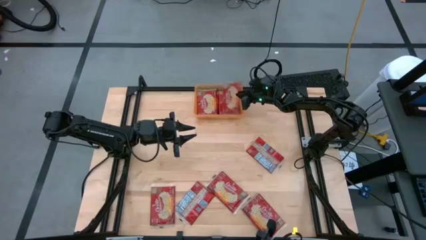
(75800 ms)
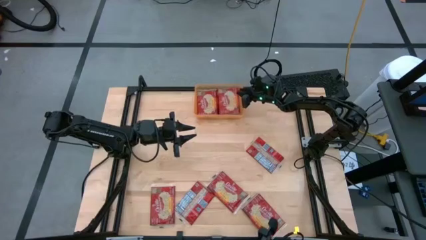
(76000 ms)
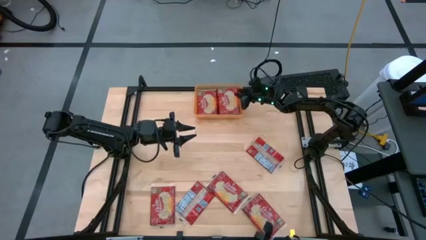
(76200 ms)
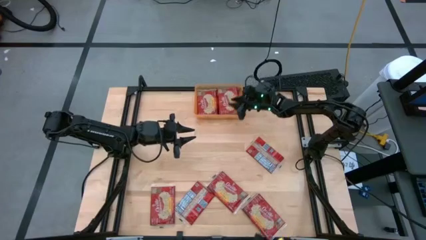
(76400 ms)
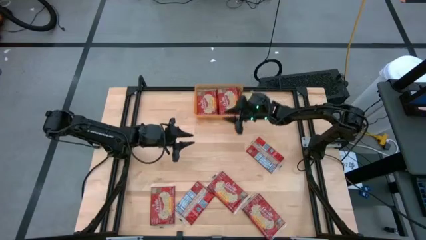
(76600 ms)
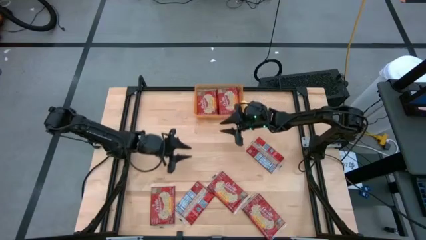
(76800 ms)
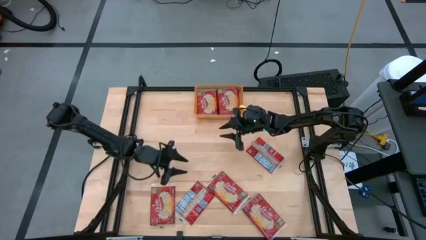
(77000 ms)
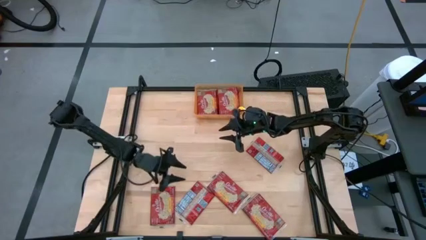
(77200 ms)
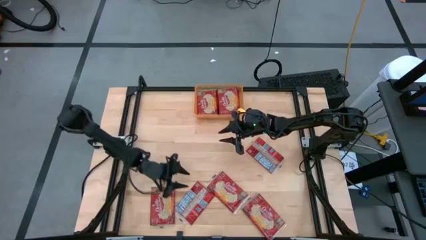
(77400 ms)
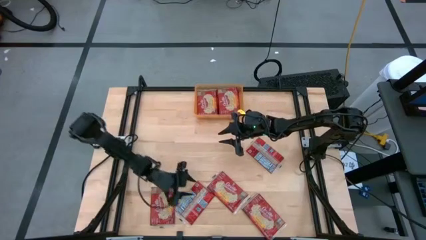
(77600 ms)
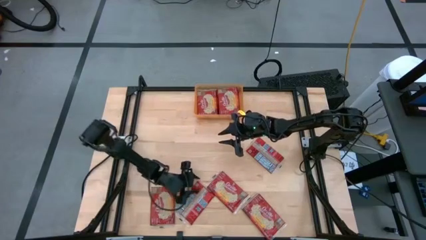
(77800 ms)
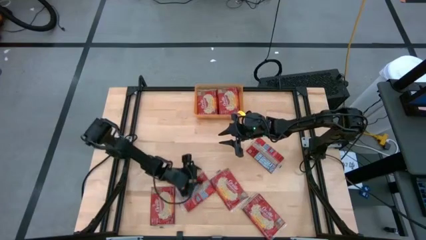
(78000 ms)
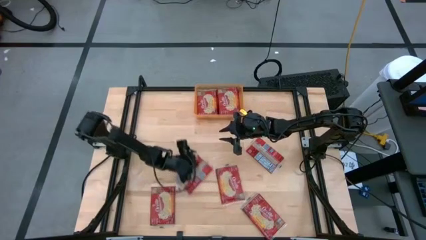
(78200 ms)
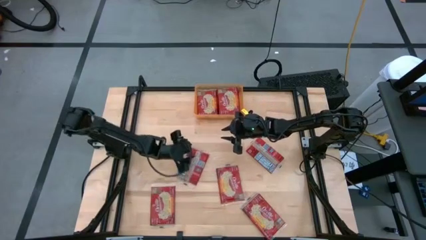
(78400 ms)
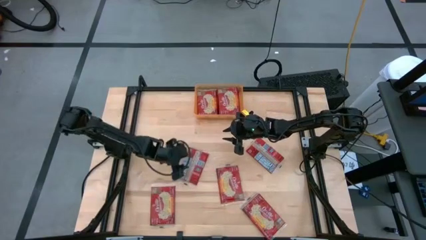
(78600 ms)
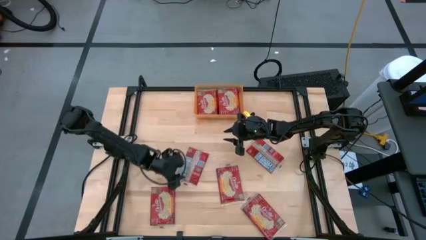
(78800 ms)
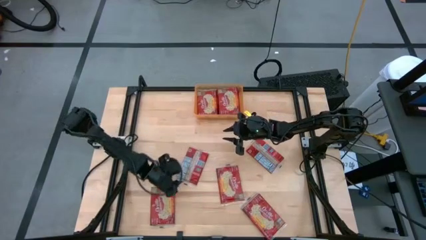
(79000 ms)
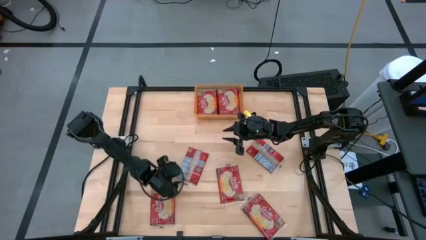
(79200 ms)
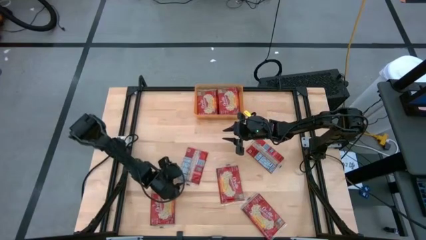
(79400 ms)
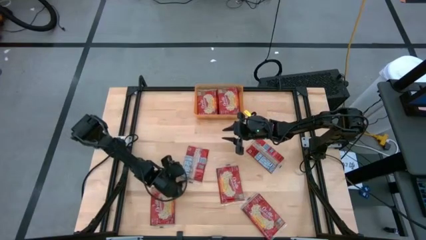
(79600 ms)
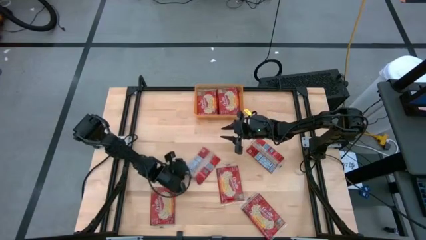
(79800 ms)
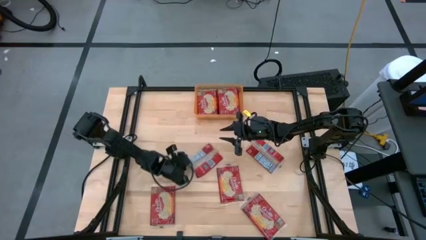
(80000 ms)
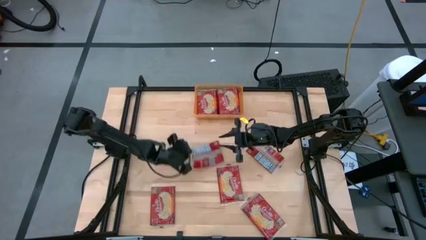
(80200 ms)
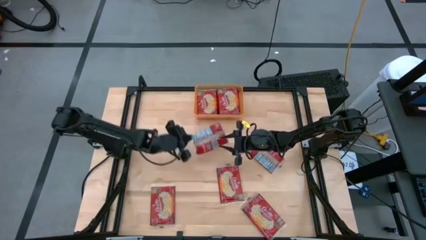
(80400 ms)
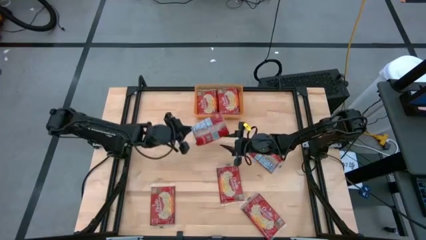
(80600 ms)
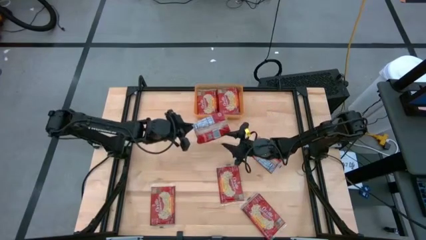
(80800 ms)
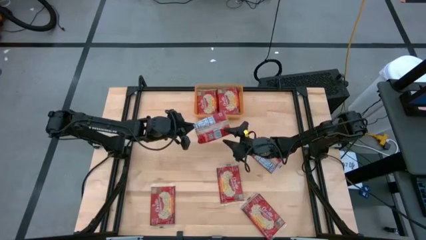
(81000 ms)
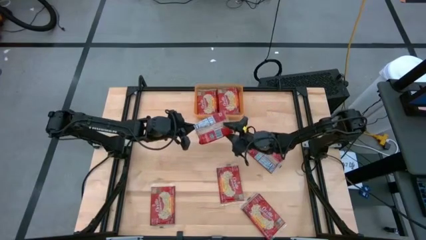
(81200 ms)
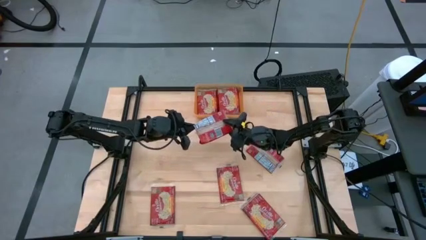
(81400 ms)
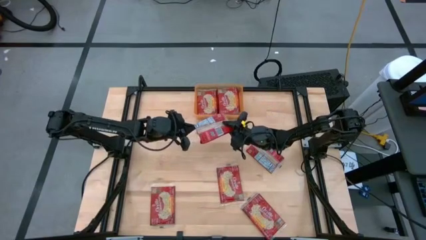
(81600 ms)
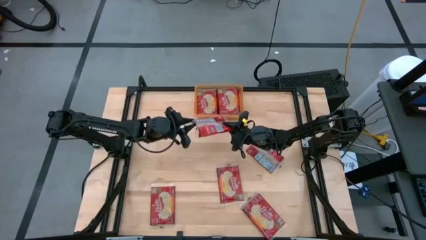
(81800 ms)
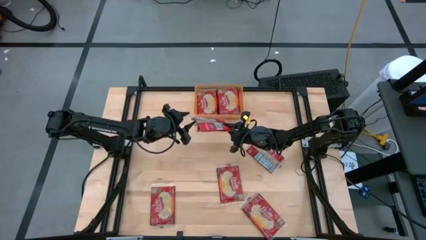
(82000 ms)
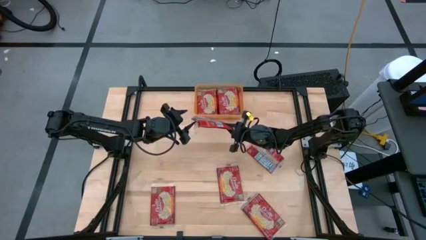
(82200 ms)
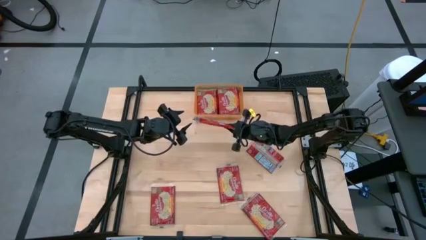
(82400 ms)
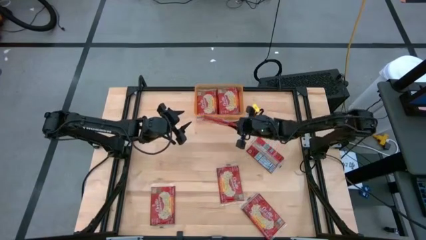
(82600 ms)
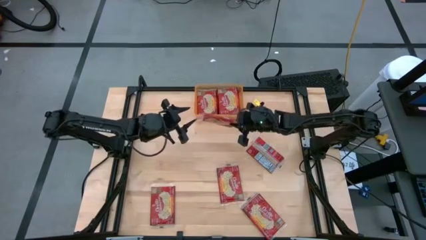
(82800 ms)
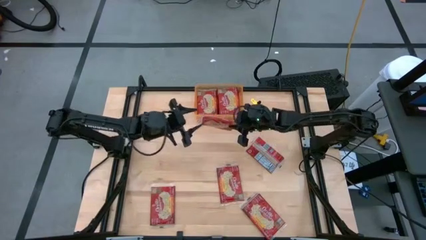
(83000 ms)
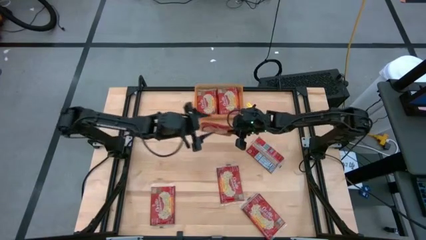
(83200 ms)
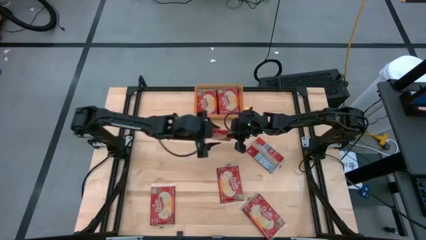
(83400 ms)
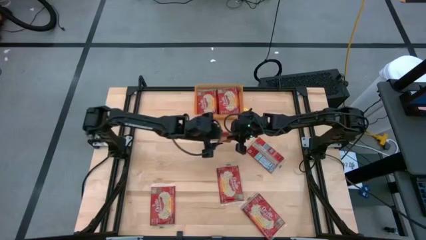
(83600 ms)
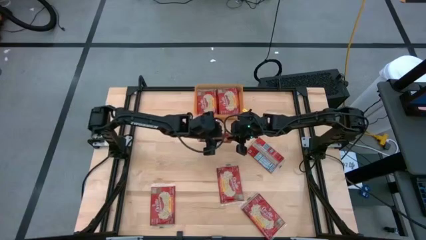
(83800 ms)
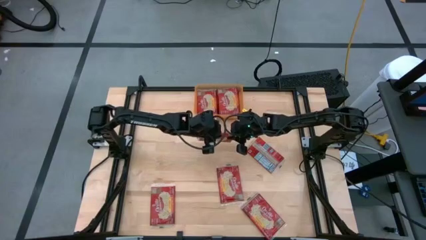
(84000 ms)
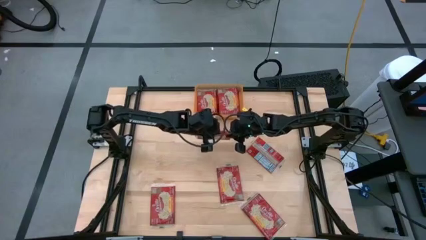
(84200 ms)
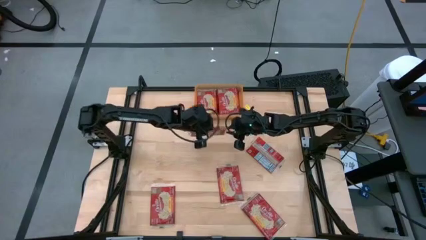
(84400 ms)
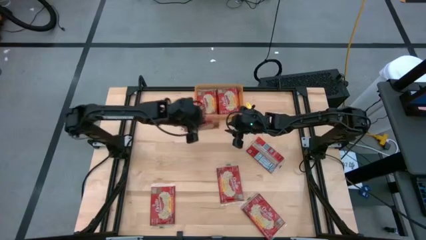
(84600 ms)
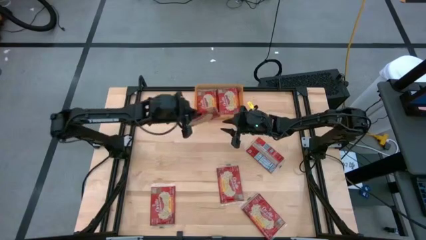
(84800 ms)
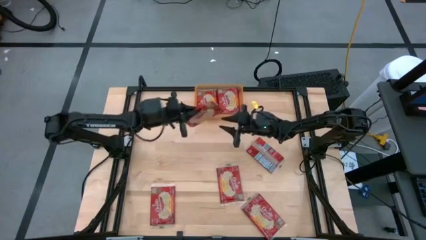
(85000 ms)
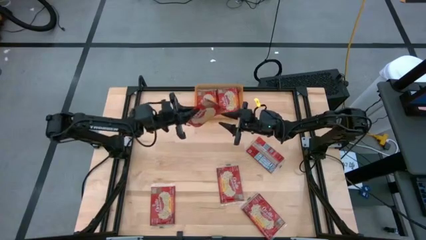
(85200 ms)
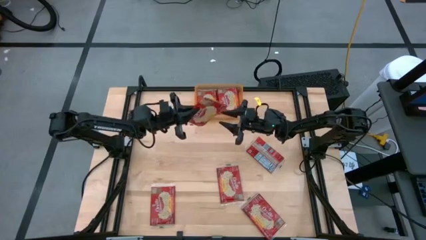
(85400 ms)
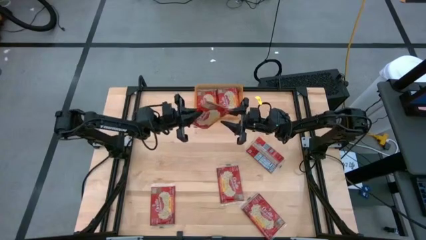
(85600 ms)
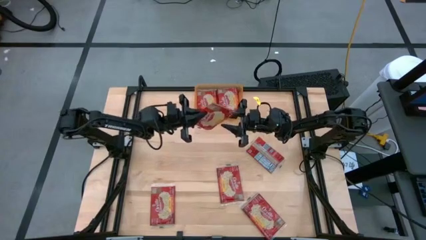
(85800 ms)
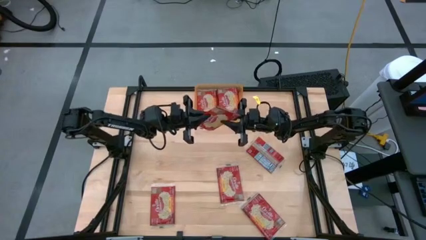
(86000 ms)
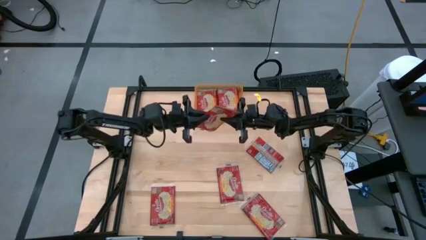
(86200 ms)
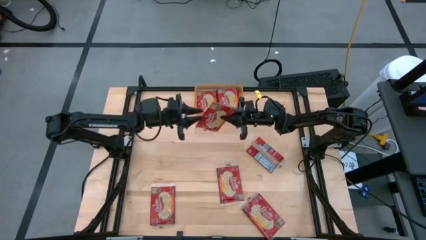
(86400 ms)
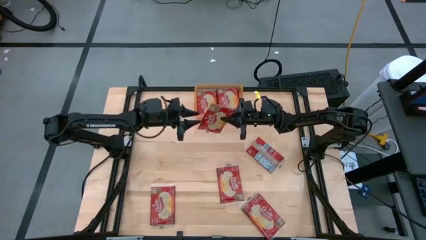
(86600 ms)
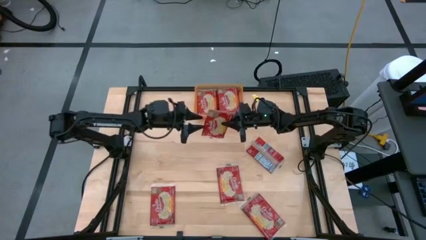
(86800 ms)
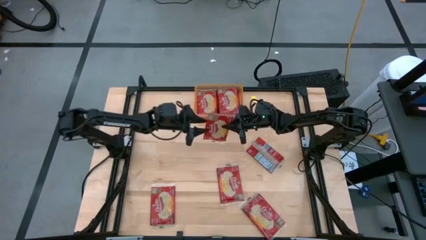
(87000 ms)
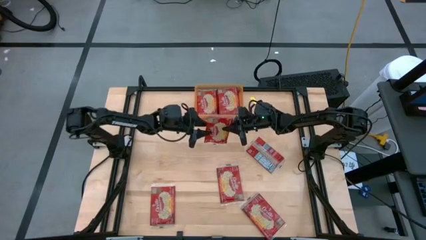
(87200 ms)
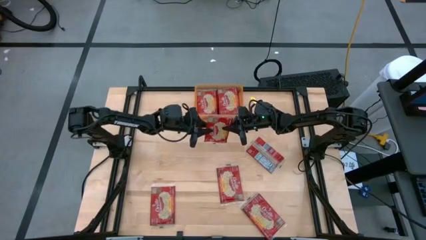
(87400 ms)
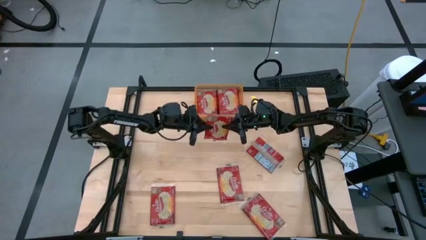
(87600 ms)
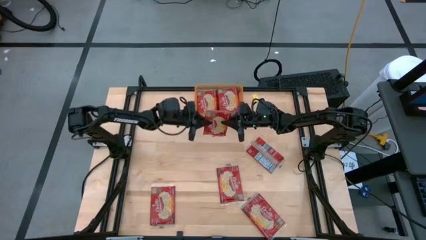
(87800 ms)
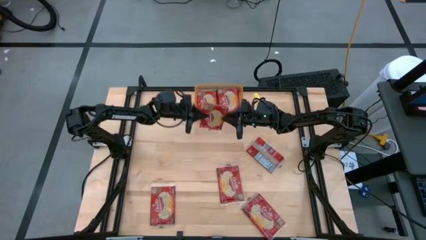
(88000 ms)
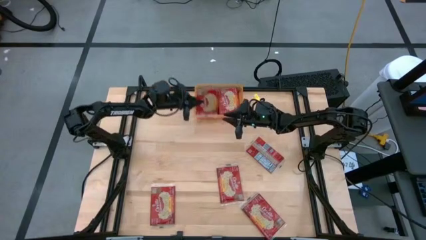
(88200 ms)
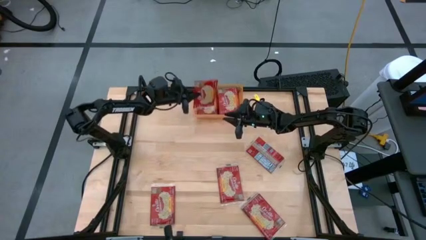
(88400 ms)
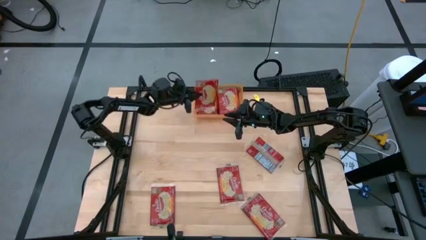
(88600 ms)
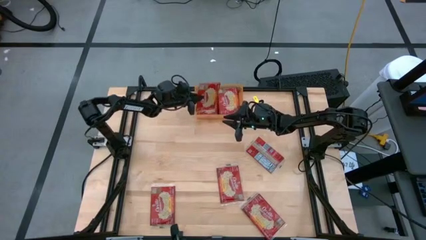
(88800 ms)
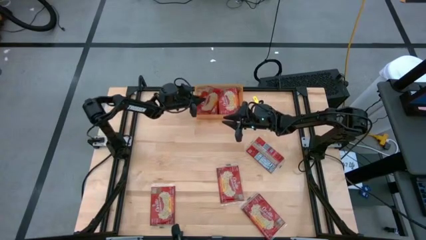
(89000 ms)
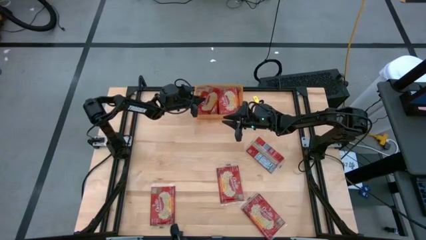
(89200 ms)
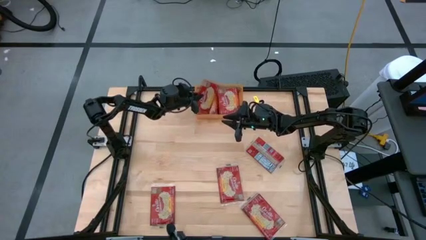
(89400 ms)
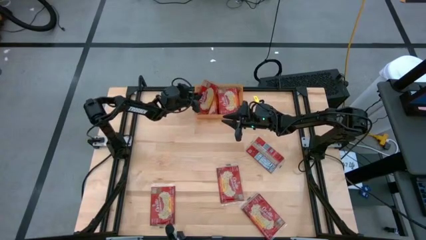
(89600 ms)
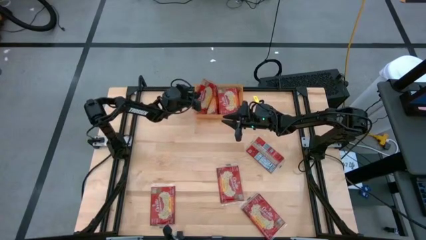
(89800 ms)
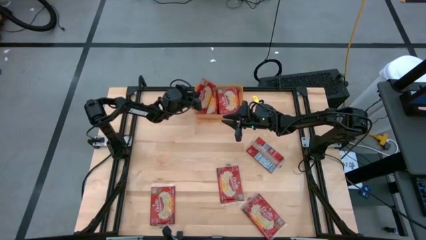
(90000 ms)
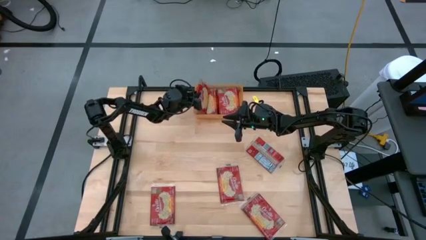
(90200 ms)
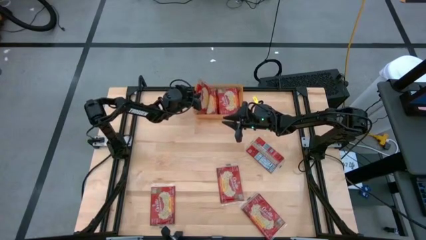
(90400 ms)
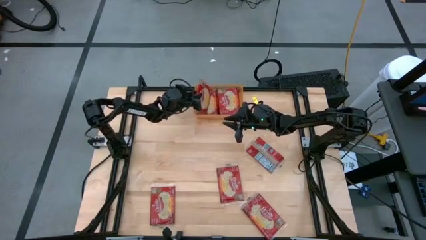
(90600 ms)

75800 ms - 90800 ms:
Task: Sort popcorn bags into baskets
Put the popcorn pack into the orange bin

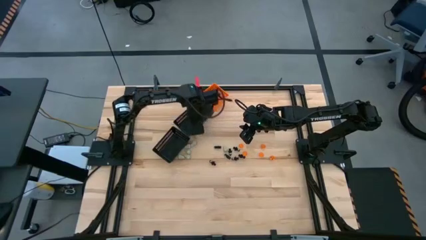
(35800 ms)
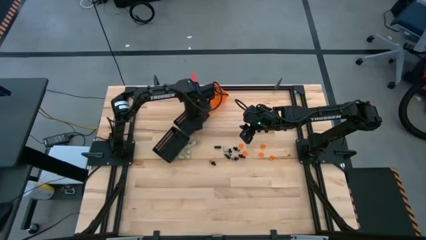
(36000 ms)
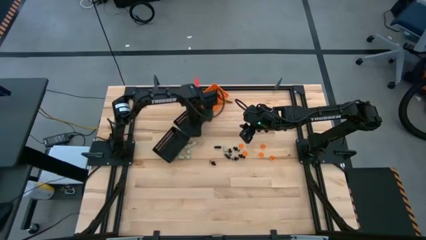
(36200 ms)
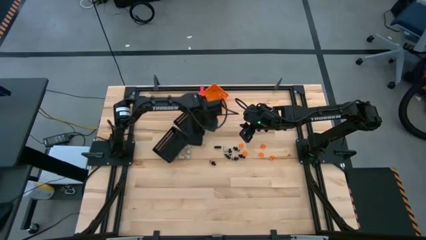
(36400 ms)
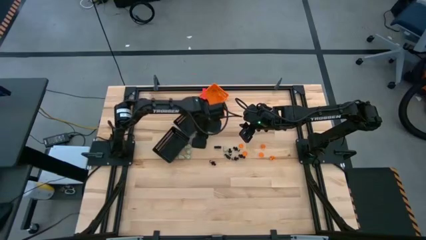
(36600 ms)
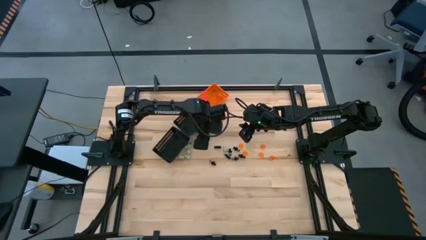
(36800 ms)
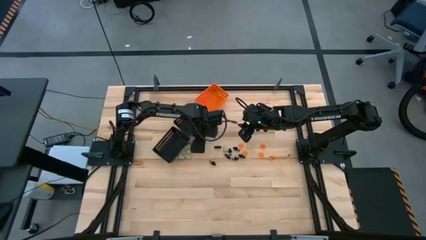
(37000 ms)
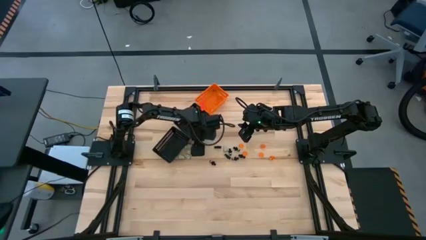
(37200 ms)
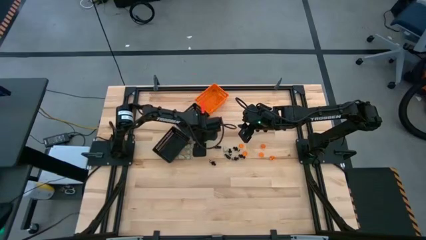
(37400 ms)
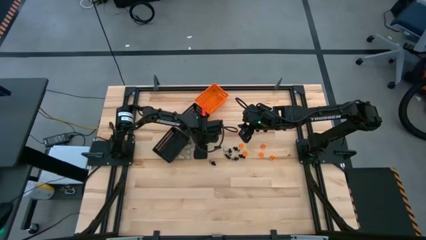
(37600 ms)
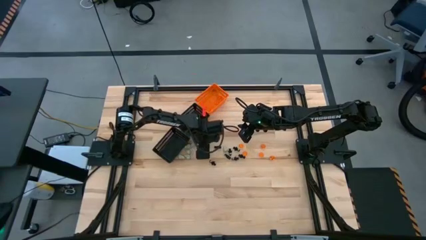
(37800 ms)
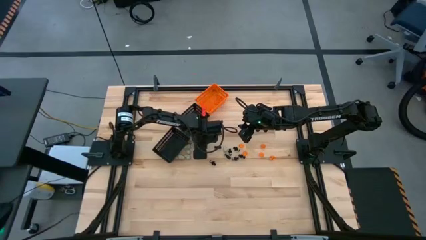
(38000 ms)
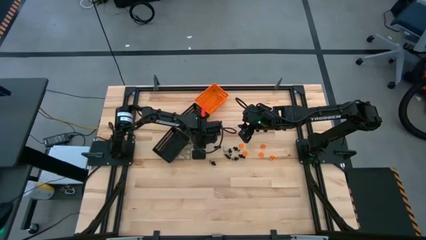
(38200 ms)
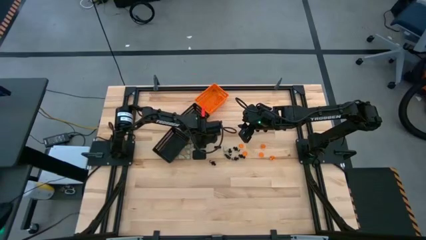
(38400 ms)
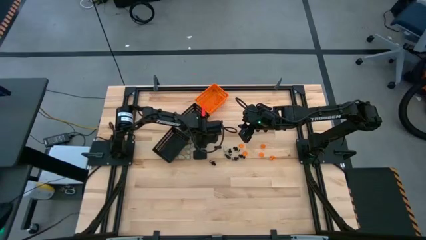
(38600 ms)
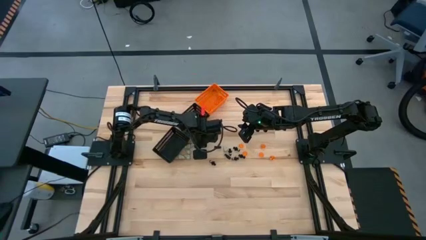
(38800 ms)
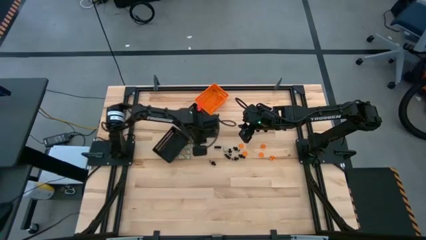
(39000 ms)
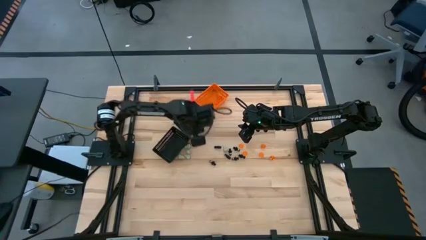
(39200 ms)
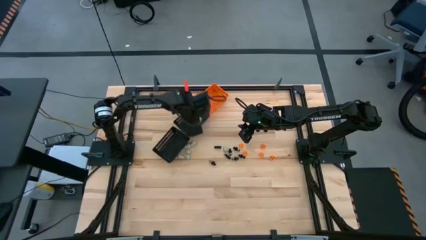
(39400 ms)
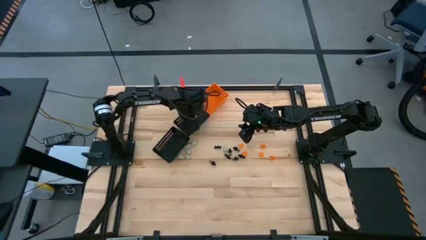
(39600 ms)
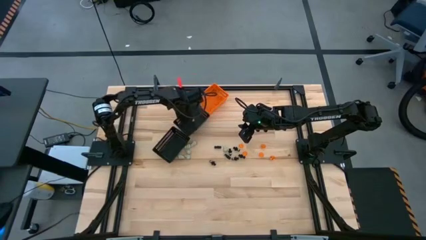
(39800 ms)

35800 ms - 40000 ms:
Task: Sort Halloween decoration
Put the white skull toy into the top black bin
